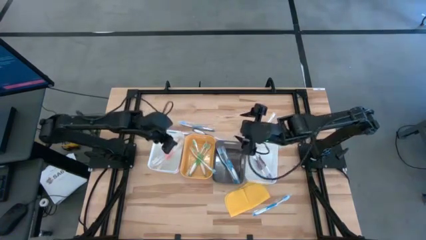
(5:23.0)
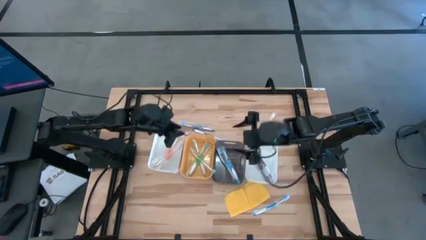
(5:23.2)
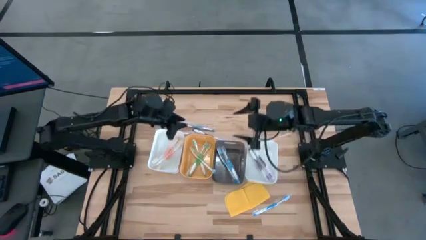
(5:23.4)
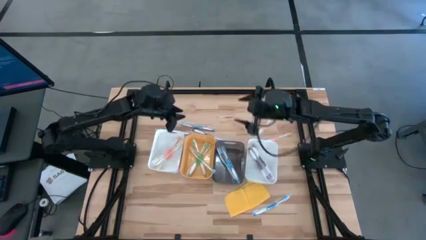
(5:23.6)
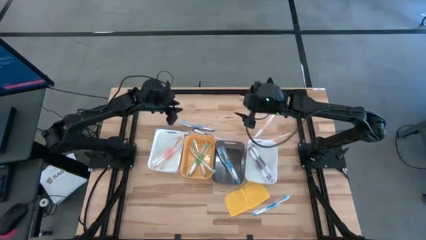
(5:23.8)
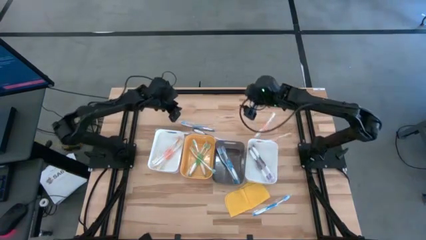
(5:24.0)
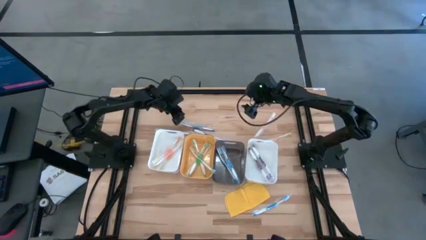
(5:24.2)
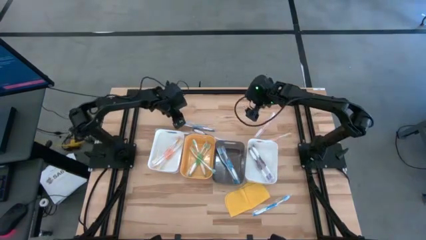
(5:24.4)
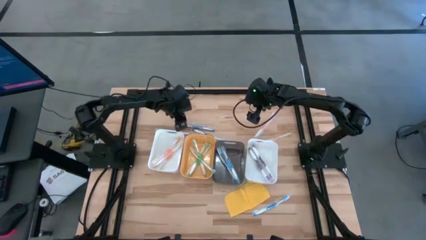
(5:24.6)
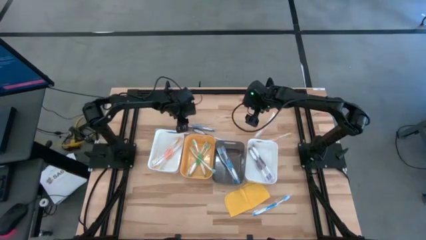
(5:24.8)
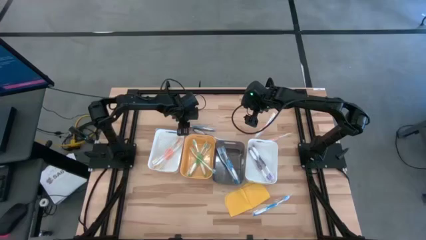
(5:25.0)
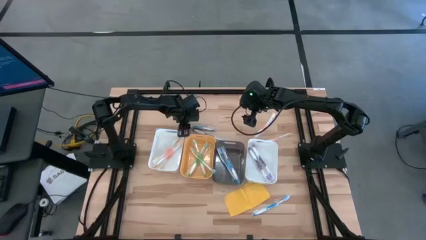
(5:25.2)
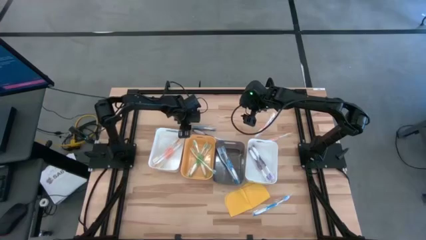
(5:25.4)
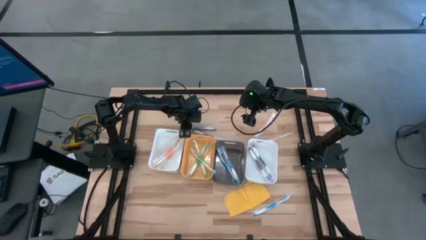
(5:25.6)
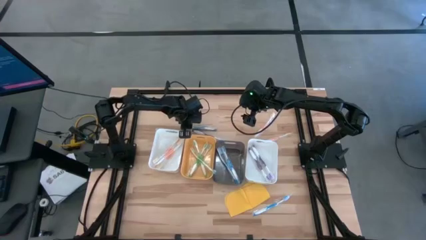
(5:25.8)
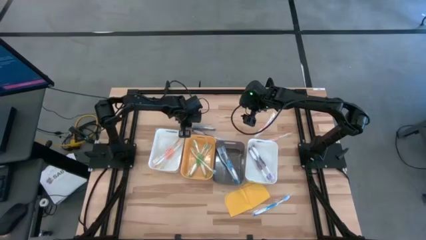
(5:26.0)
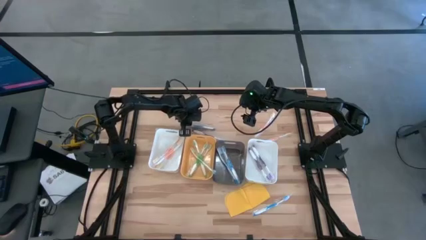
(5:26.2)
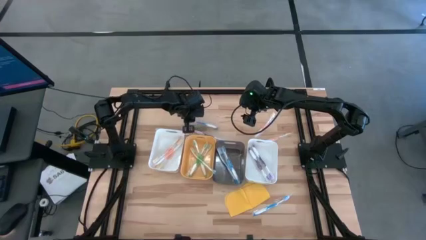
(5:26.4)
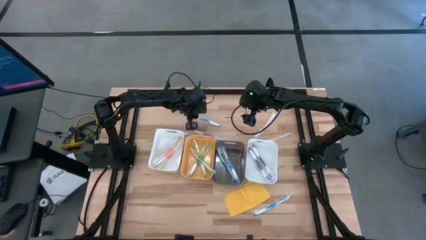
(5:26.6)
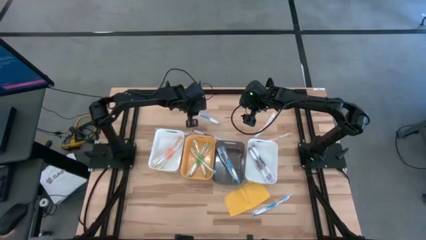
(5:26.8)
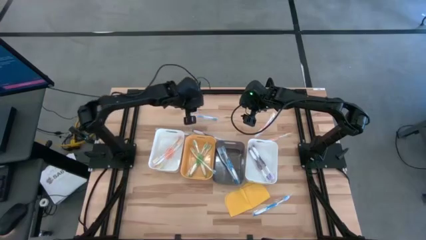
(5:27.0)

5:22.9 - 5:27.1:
Task: Pick & Place Toothbrushes
Put the blue toothbrush into the black bin

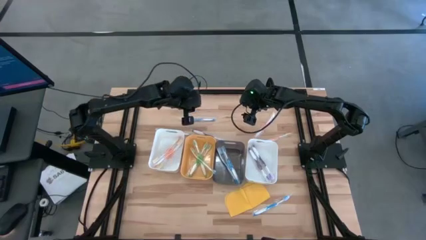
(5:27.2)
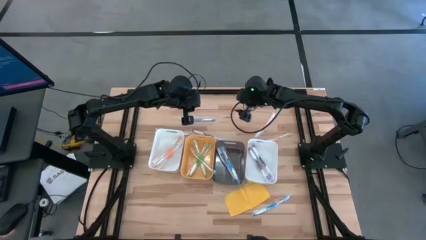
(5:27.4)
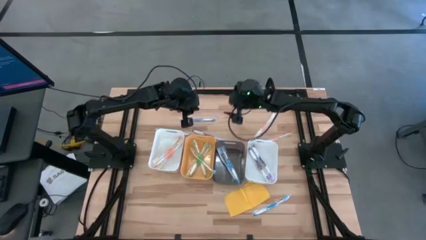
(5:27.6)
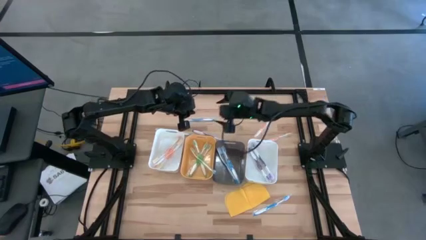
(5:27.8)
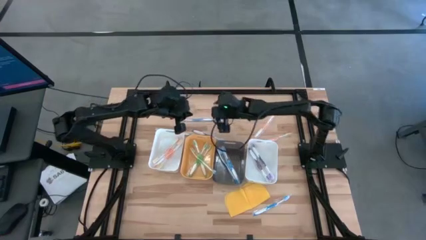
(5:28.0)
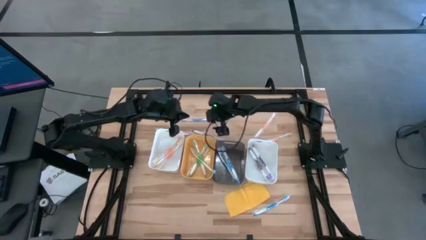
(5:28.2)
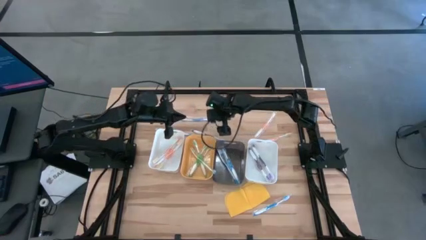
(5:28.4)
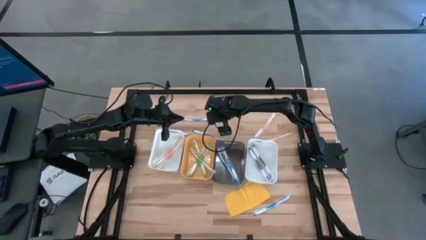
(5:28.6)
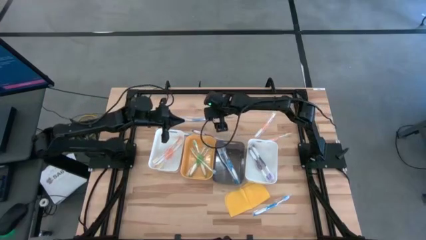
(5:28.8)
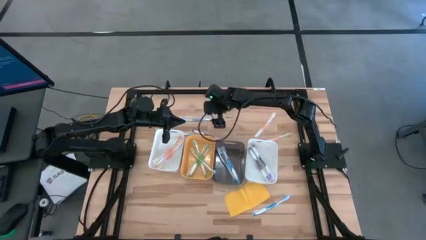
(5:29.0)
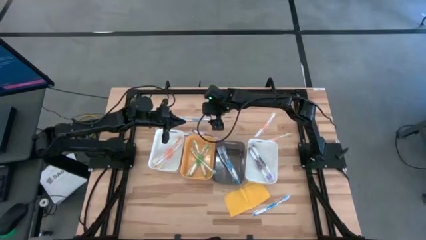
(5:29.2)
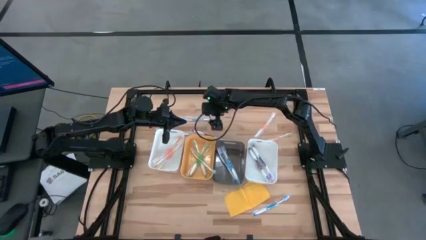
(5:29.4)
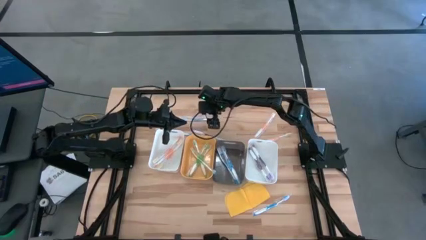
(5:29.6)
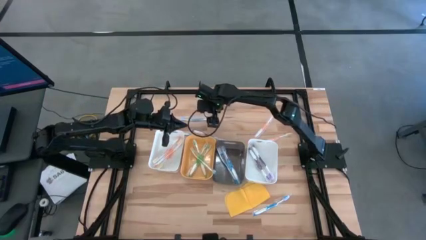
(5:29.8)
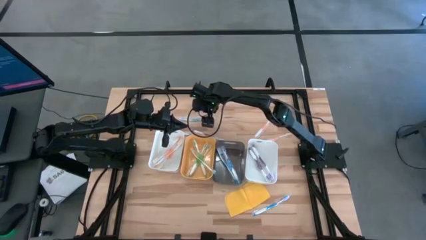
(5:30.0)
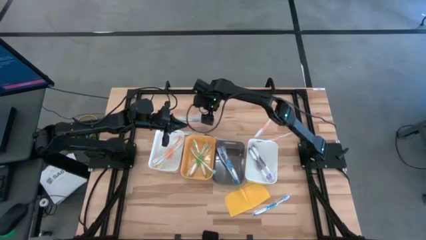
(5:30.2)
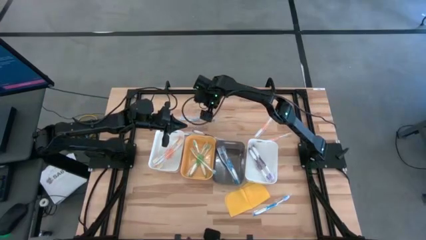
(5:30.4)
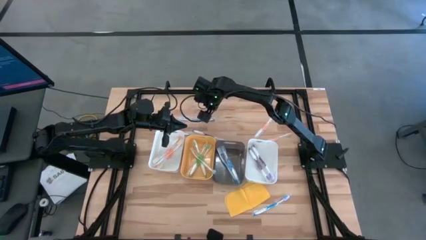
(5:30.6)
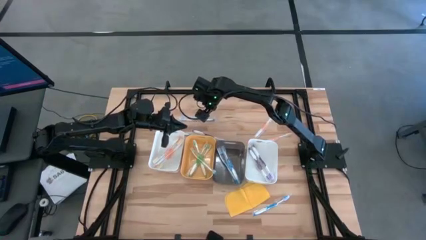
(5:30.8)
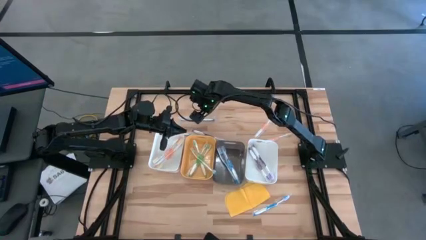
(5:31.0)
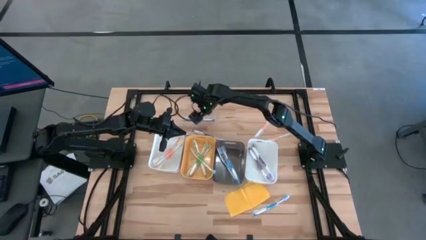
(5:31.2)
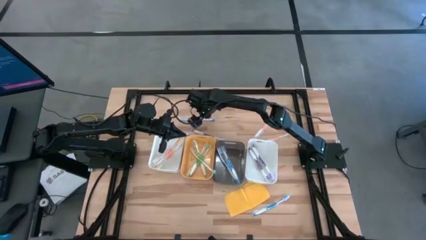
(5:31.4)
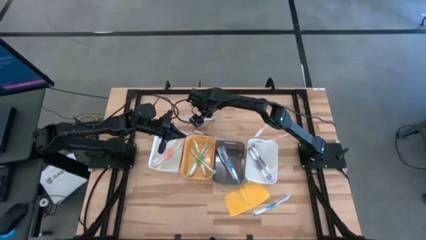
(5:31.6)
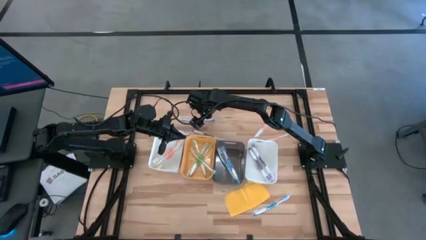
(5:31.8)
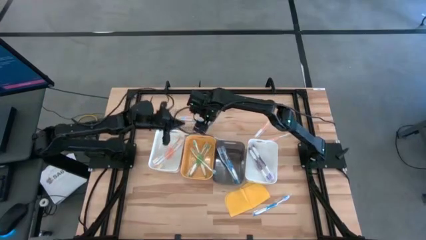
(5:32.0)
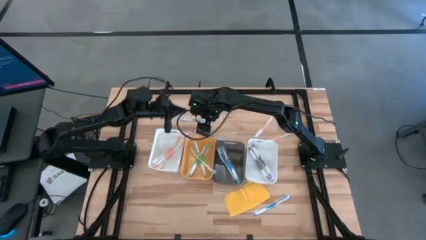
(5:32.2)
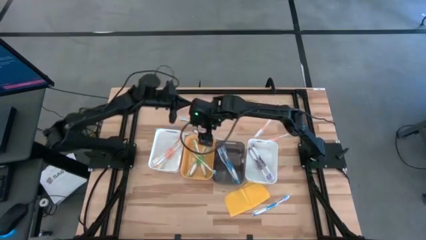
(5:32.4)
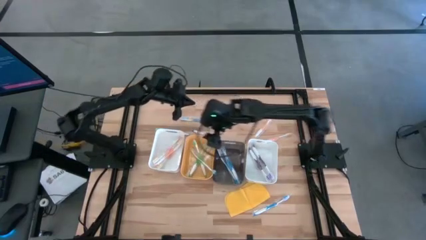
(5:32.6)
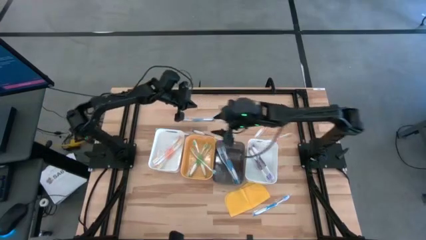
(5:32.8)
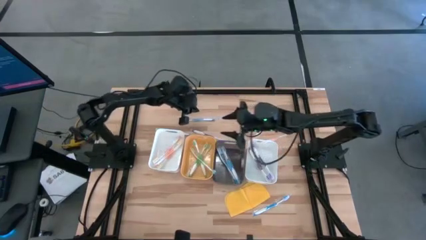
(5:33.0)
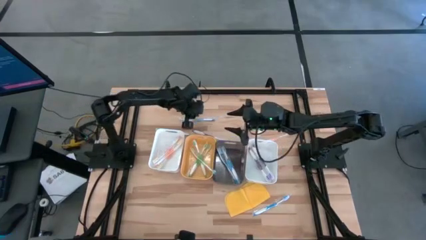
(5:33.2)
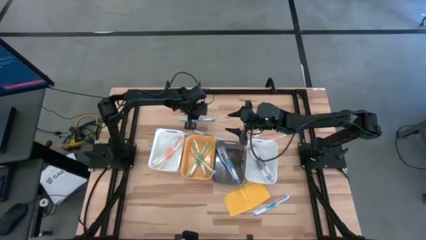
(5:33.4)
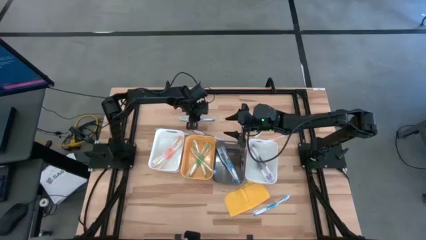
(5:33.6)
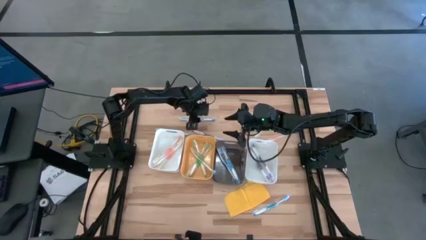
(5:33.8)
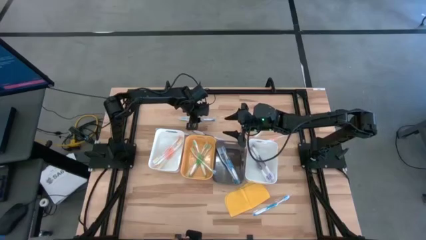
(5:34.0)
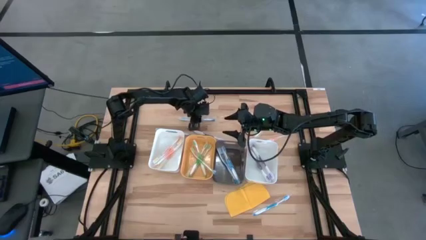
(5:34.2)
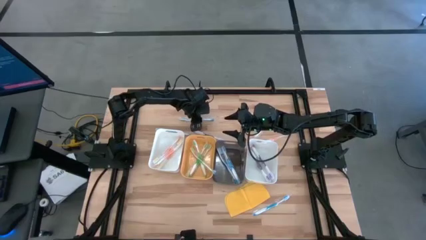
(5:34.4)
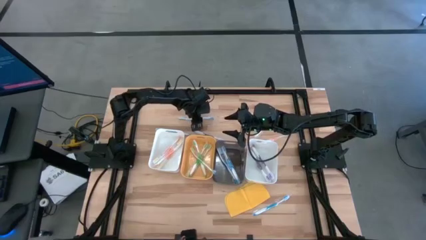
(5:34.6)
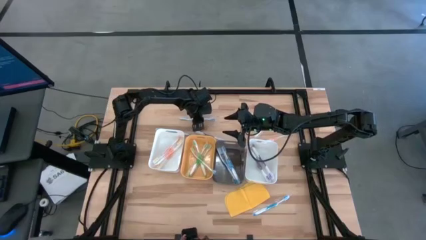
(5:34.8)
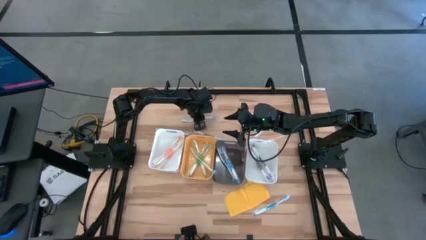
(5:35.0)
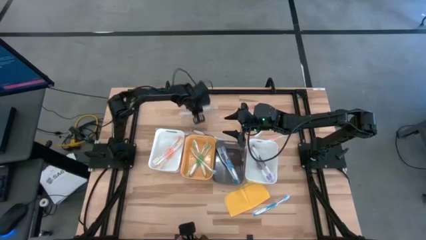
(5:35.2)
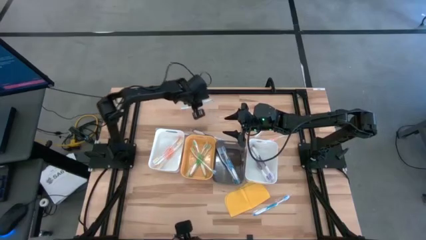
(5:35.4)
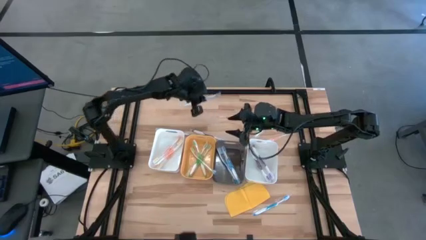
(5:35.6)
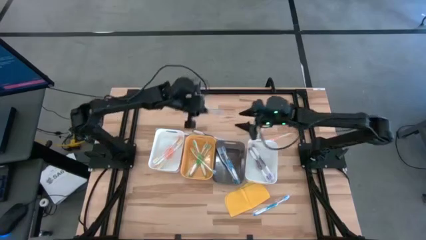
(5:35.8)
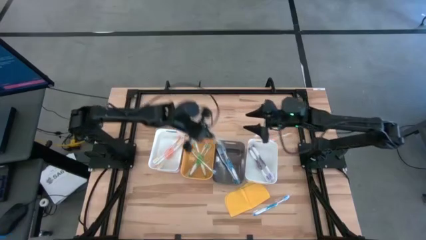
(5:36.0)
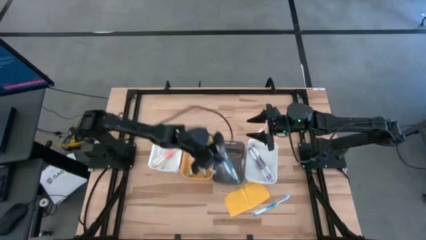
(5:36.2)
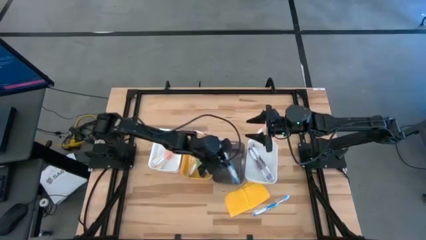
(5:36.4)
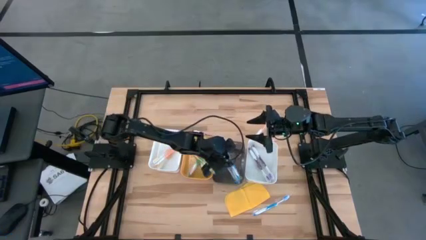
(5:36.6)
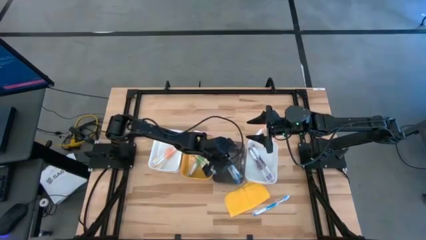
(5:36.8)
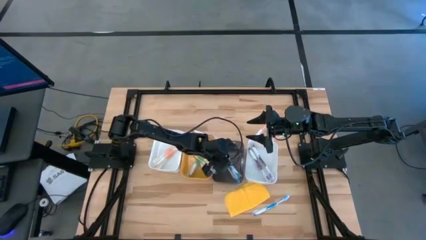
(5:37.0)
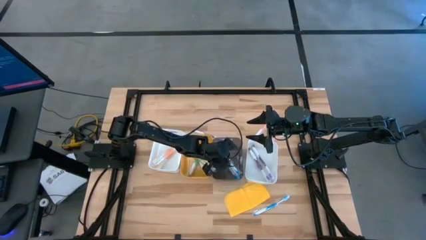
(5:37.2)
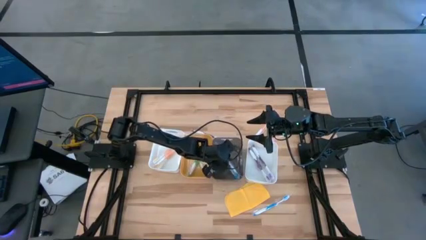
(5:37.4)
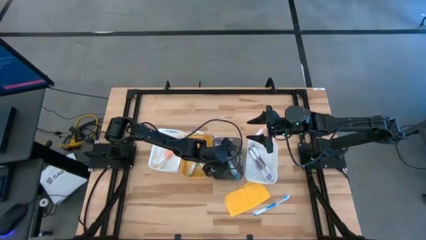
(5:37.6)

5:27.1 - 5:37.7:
Put the blue toothbrush into the black bin
